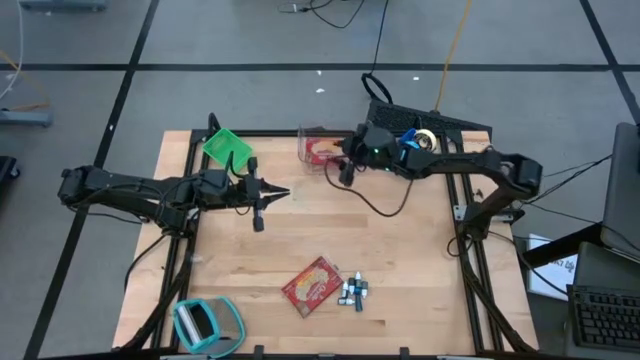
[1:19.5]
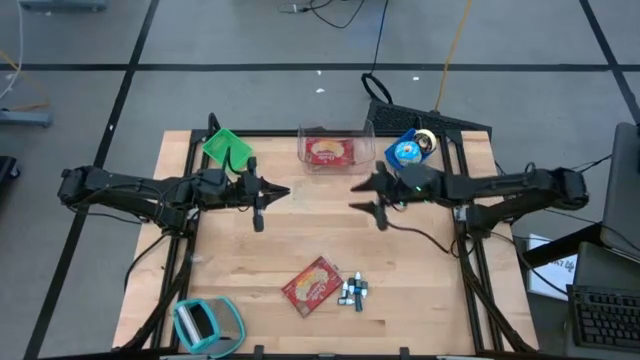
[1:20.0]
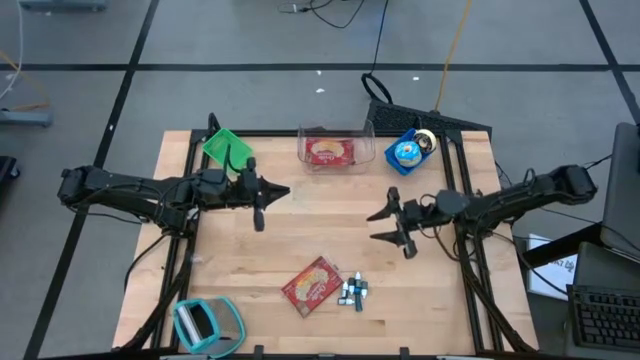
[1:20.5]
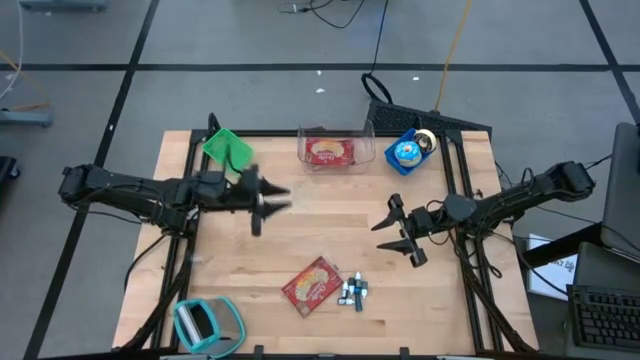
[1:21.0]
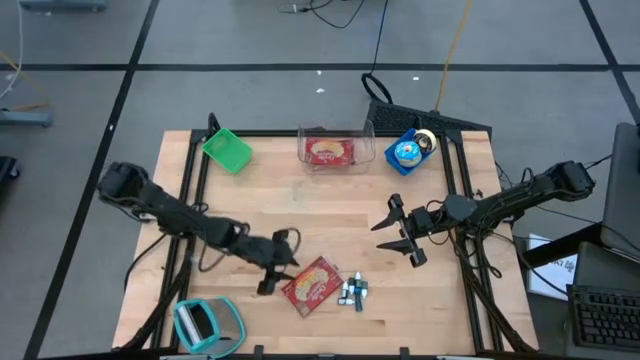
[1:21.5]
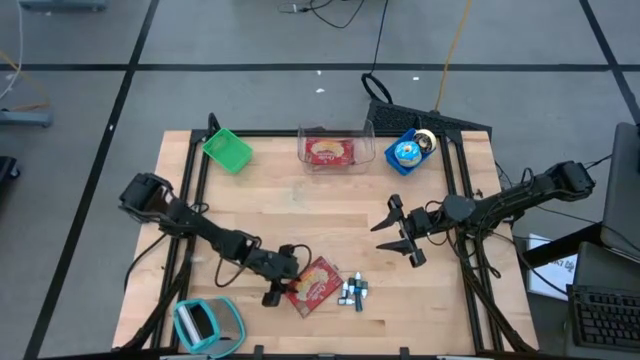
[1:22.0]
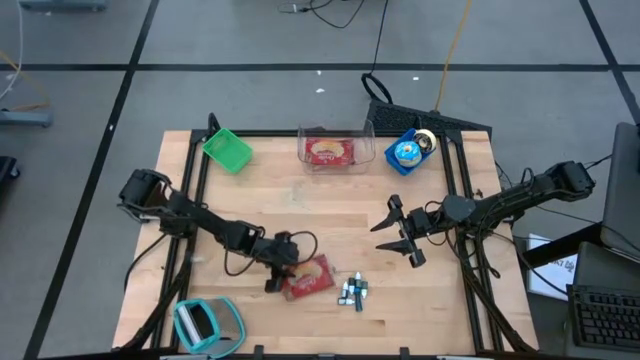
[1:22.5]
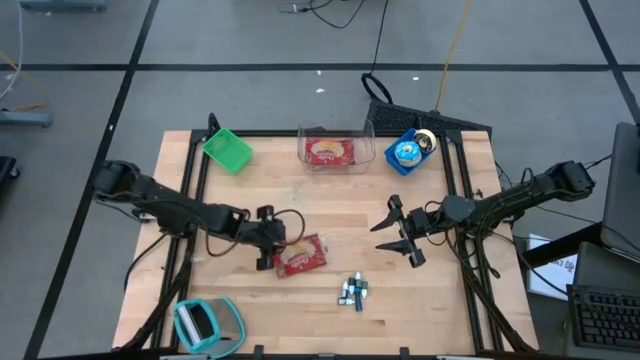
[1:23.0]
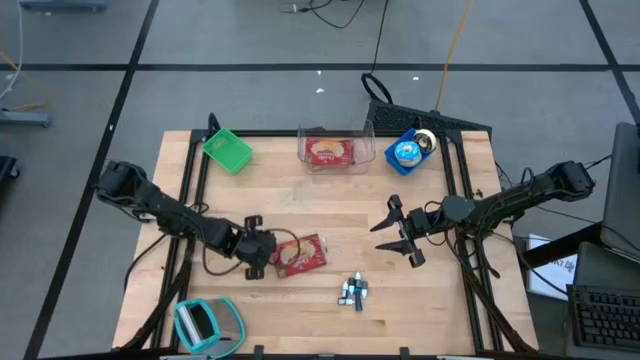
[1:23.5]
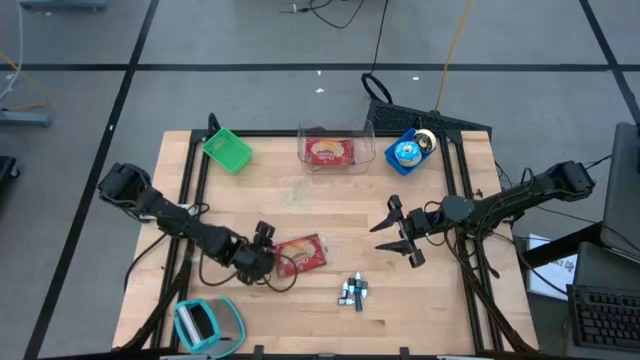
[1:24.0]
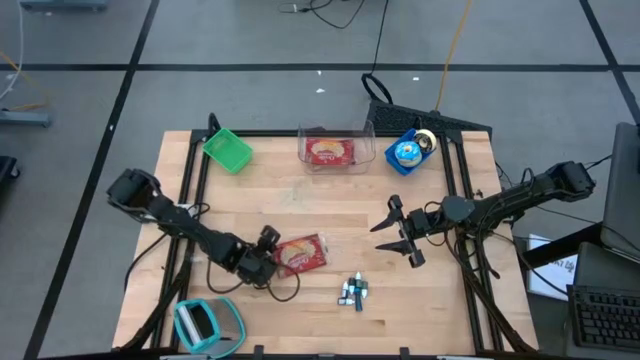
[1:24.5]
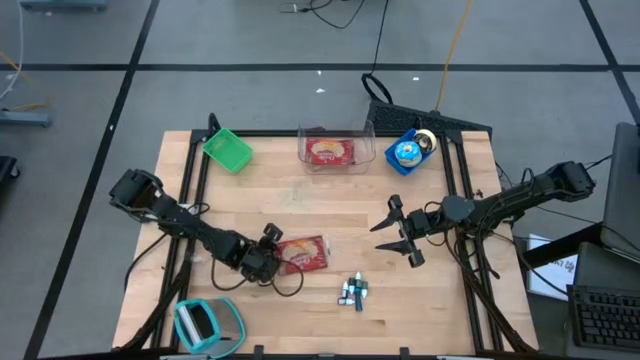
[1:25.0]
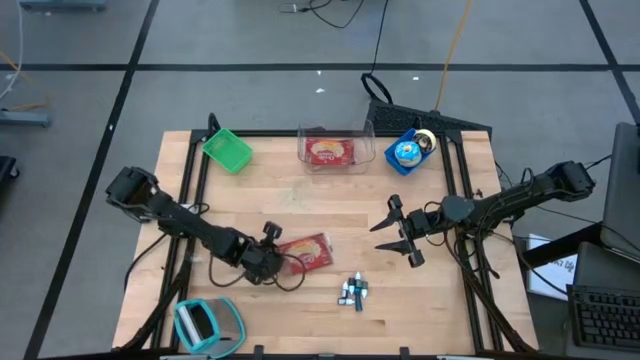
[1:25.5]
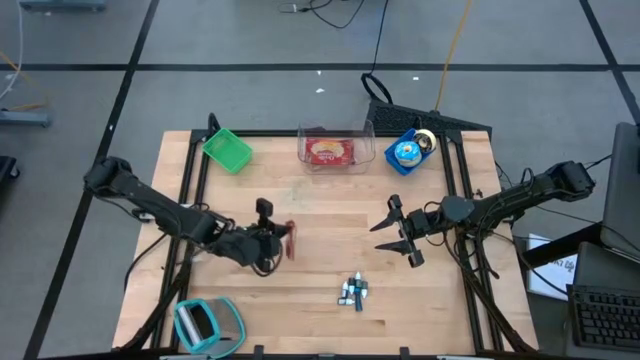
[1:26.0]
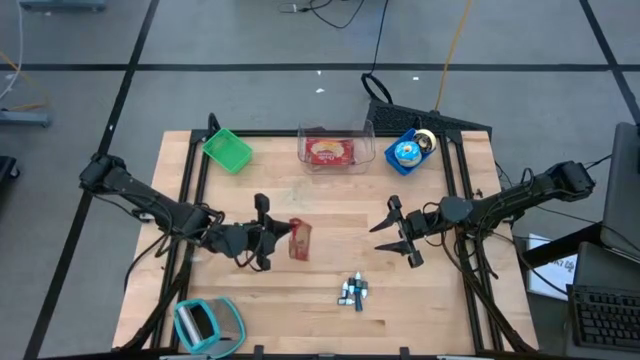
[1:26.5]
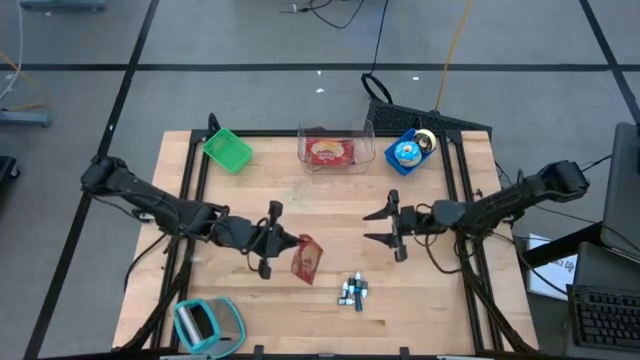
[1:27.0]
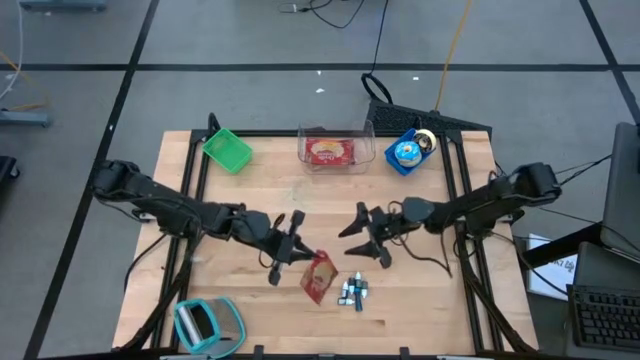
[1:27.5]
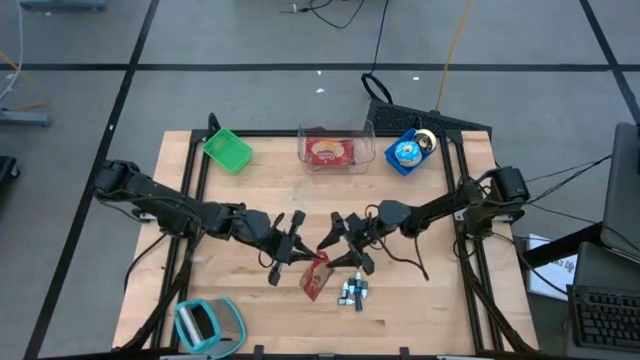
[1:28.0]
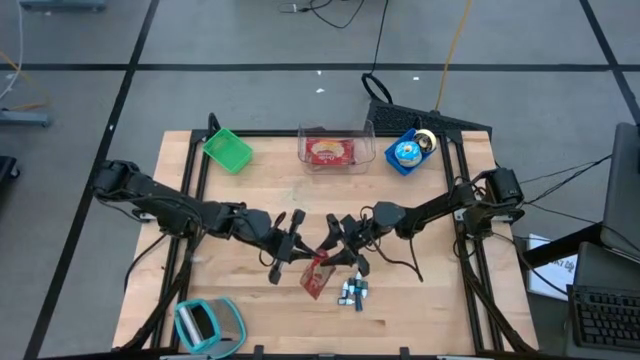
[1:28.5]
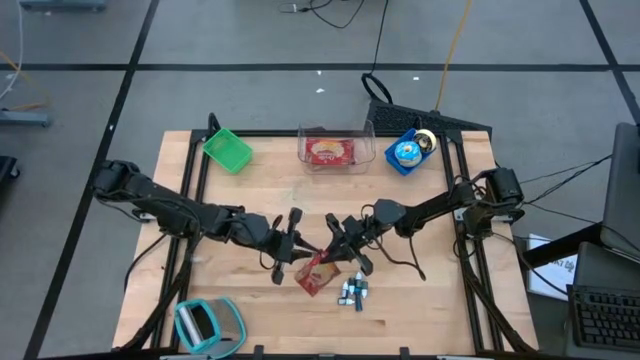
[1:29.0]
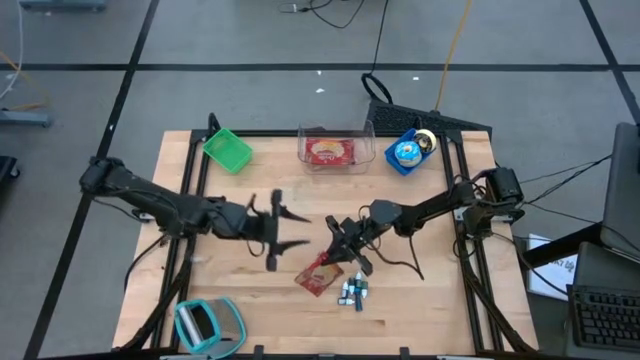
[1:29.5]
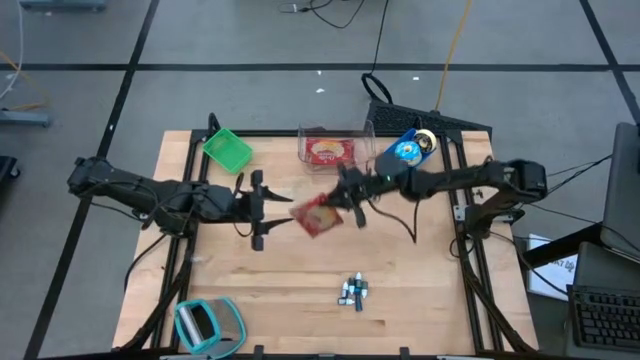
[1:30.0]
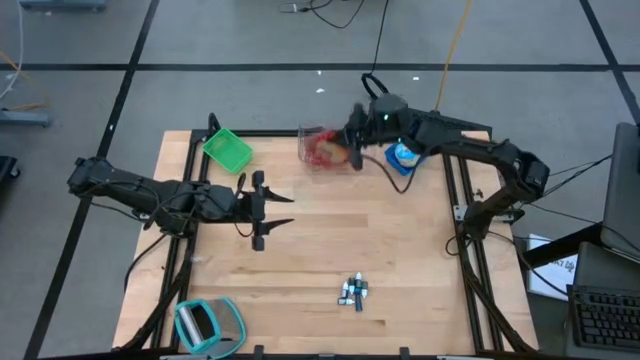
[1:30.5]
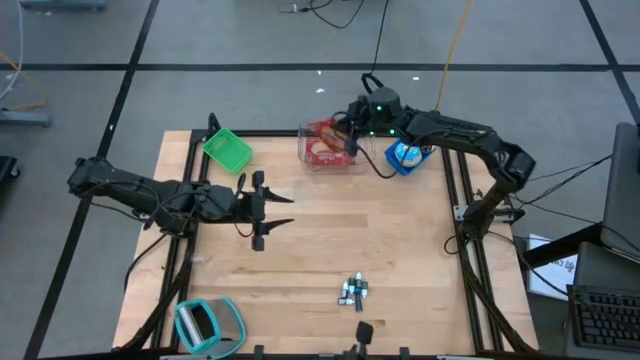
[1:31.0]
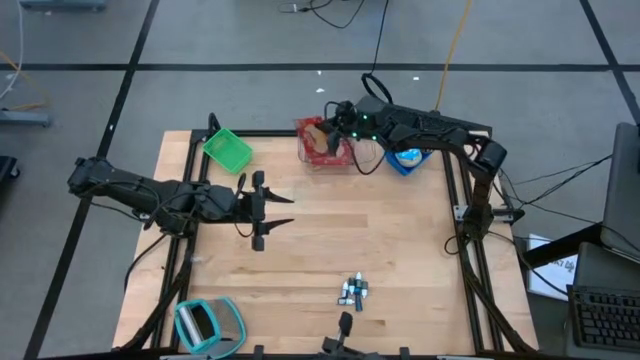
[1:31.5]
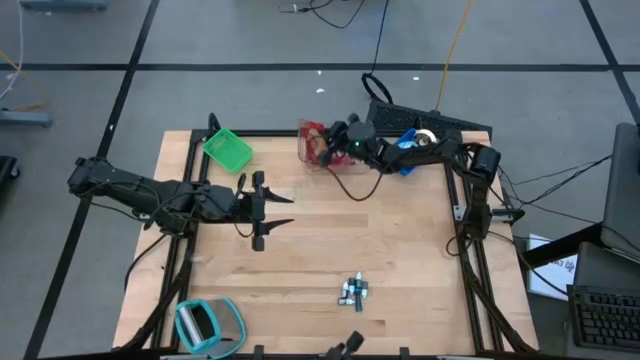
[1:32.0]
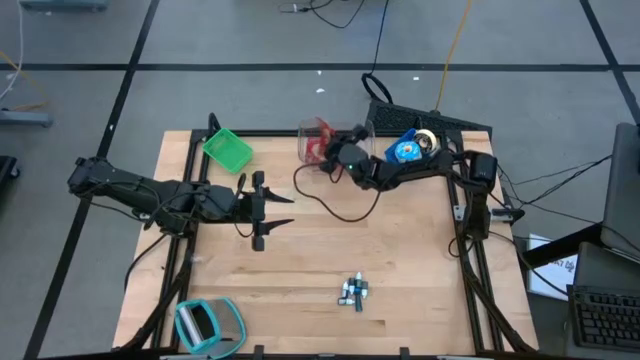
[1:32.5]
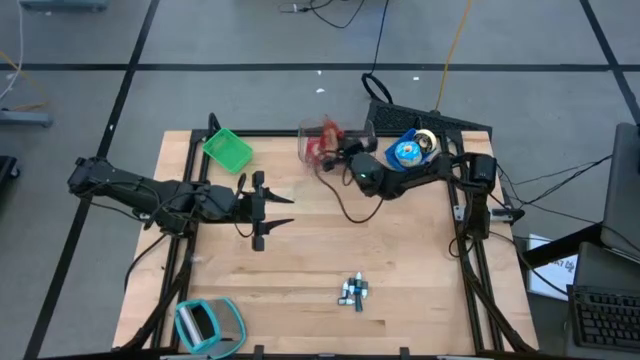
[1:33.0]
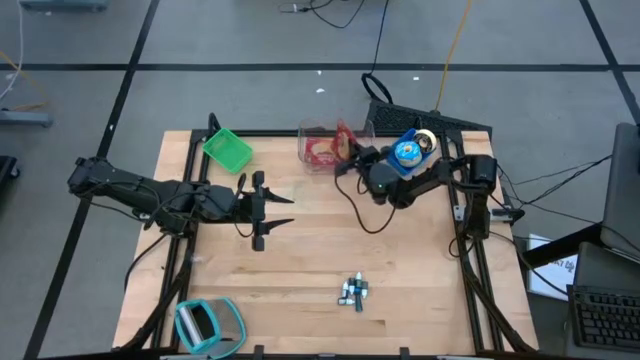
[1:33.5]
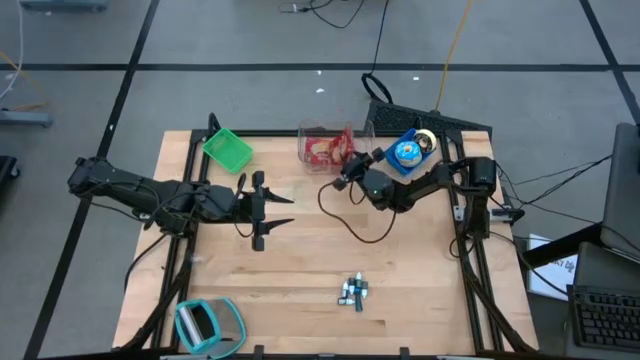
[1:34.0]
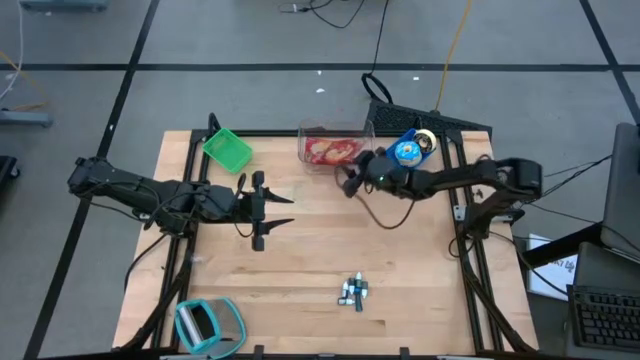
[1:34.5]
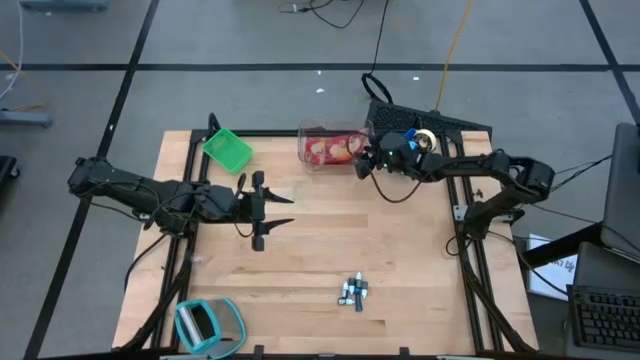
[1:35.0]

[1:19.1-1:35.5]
Put the popcorn bag into the transparent bin
